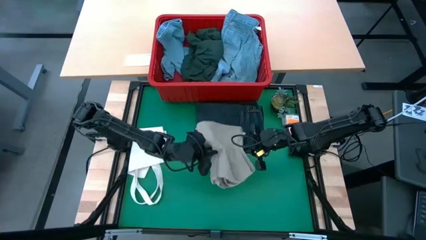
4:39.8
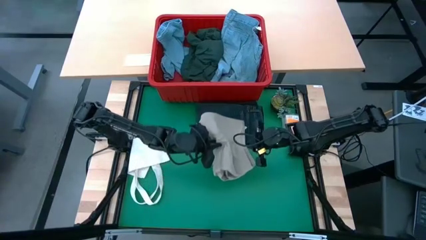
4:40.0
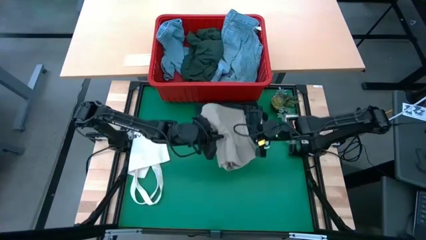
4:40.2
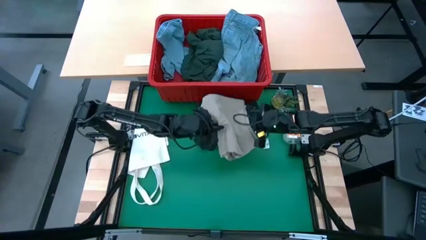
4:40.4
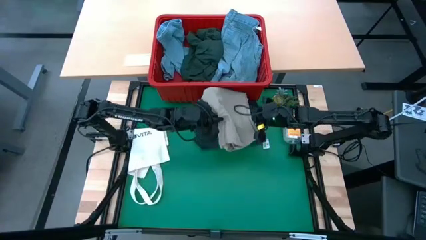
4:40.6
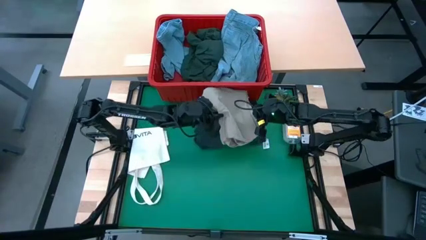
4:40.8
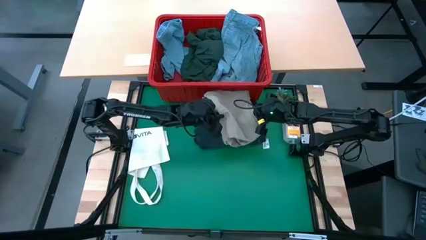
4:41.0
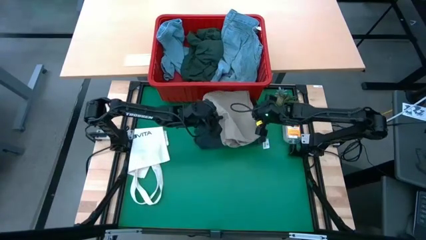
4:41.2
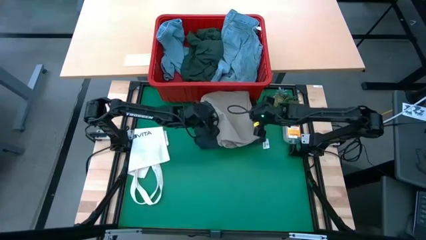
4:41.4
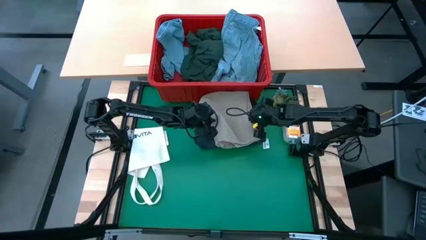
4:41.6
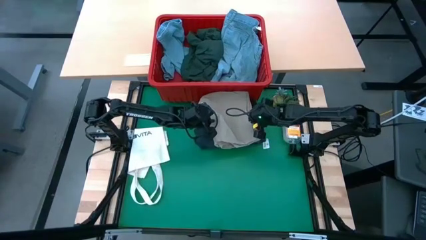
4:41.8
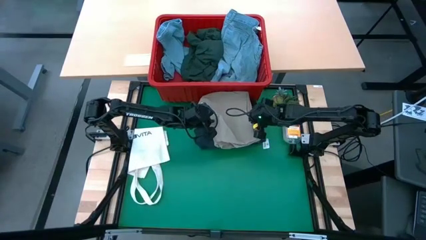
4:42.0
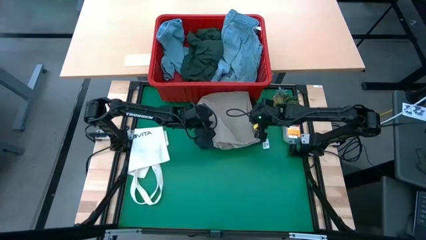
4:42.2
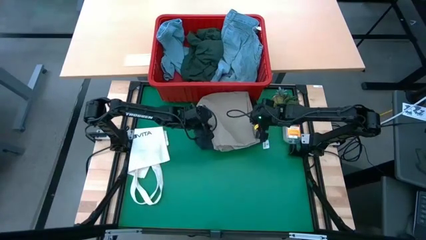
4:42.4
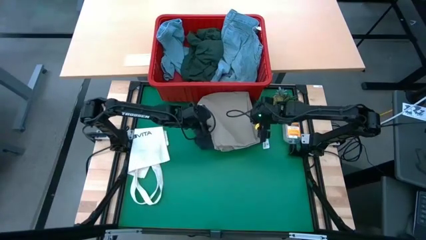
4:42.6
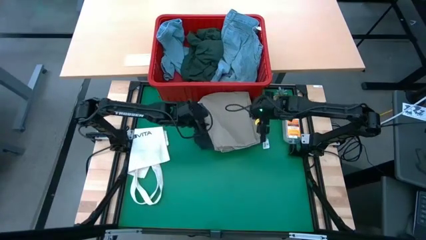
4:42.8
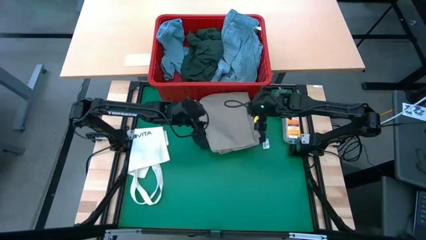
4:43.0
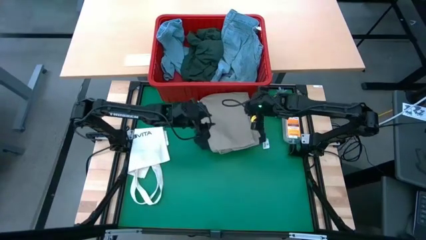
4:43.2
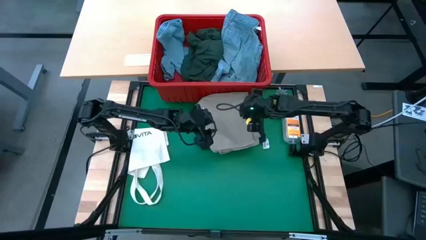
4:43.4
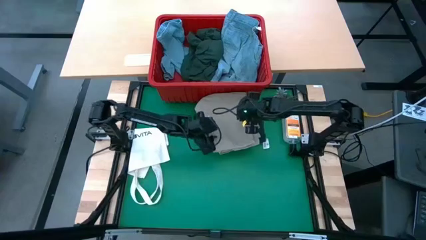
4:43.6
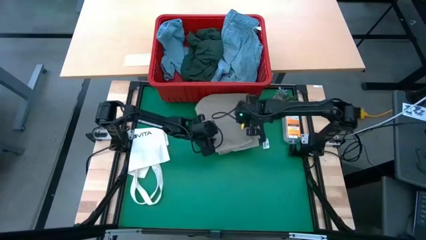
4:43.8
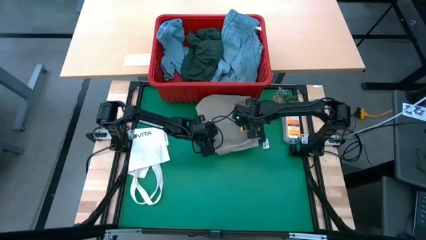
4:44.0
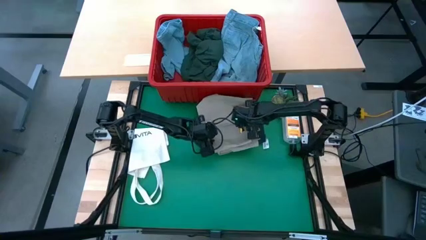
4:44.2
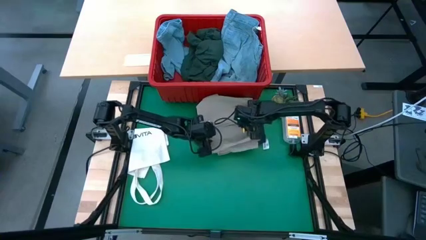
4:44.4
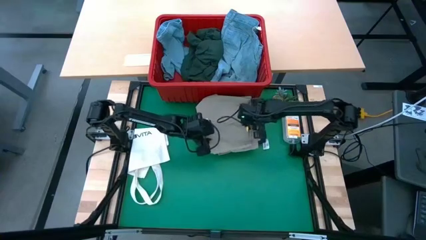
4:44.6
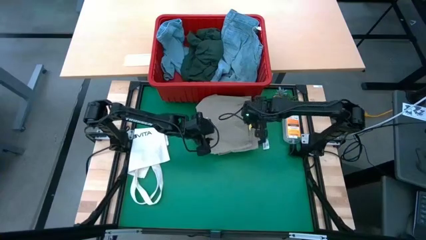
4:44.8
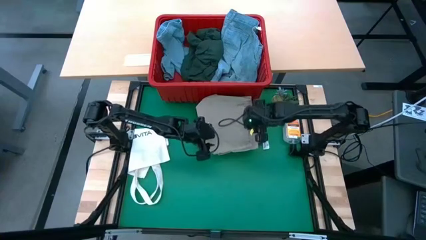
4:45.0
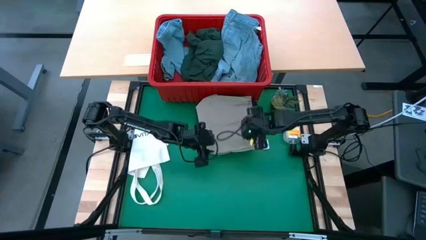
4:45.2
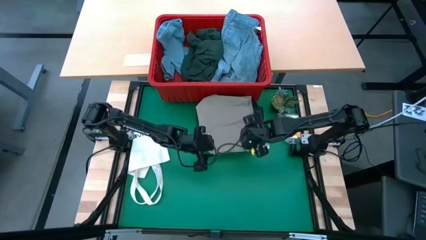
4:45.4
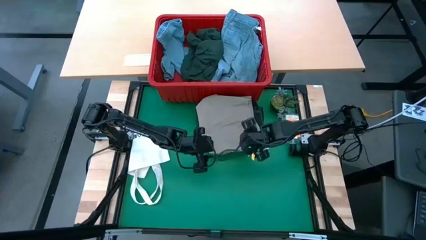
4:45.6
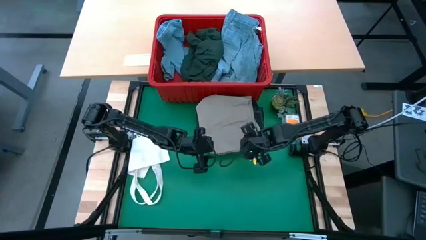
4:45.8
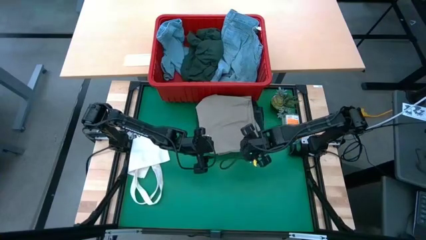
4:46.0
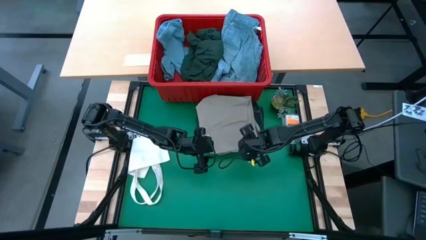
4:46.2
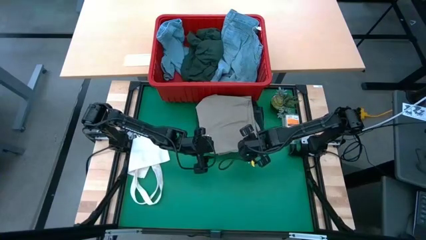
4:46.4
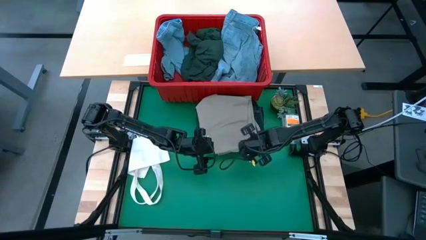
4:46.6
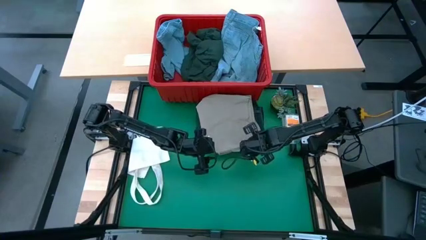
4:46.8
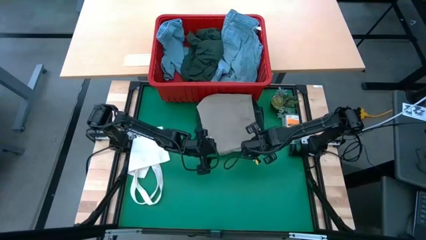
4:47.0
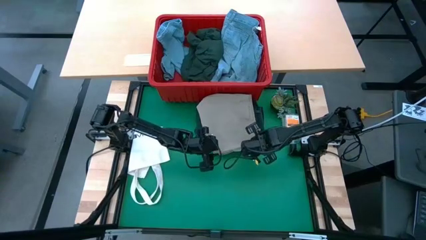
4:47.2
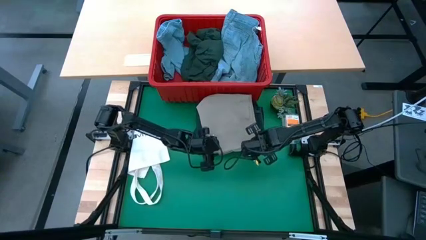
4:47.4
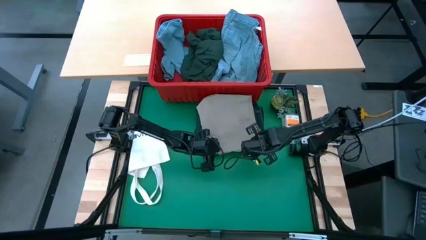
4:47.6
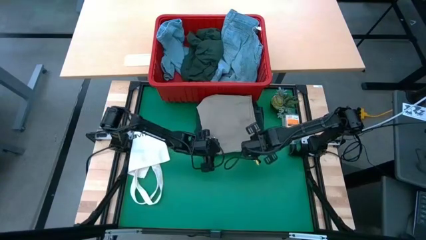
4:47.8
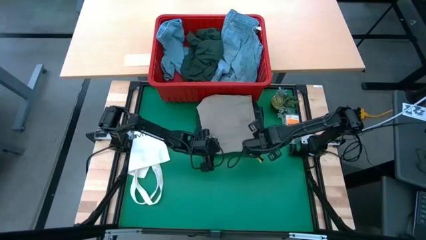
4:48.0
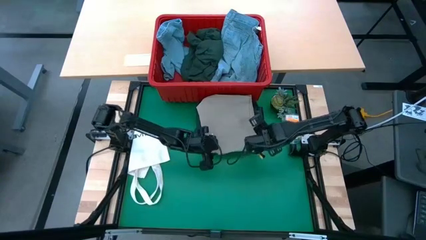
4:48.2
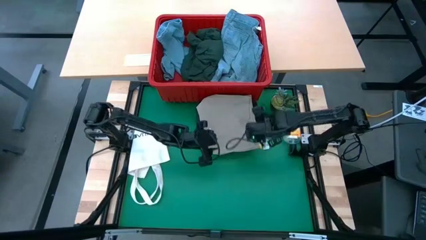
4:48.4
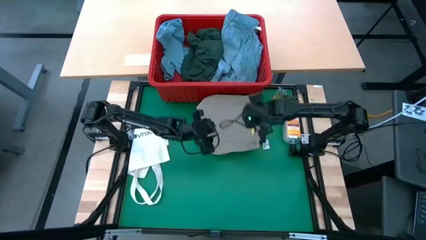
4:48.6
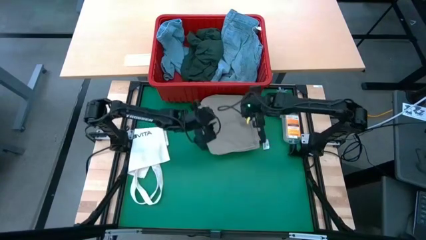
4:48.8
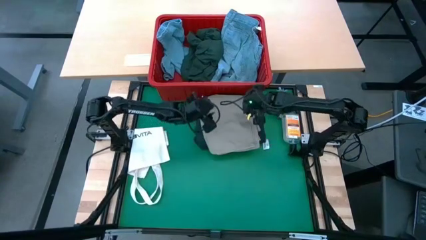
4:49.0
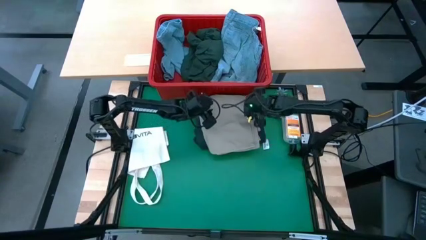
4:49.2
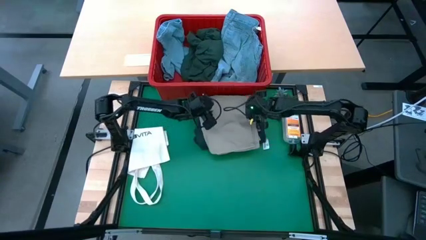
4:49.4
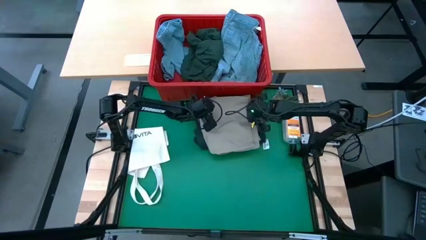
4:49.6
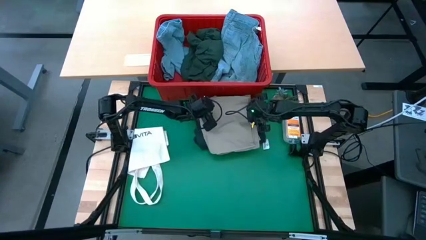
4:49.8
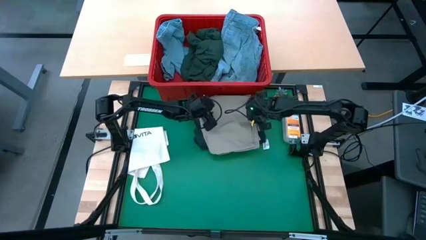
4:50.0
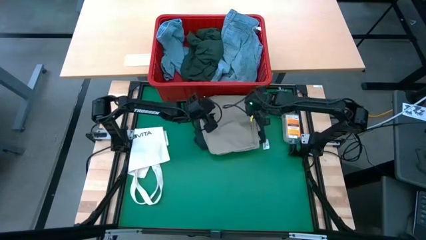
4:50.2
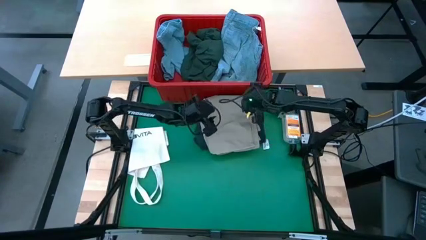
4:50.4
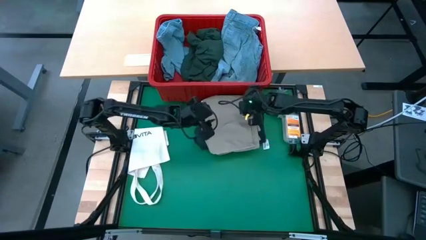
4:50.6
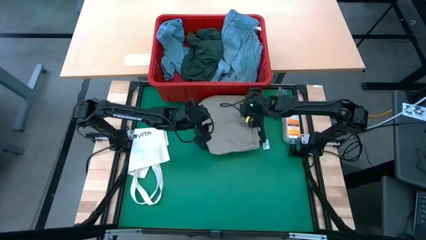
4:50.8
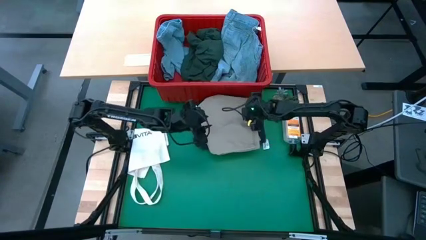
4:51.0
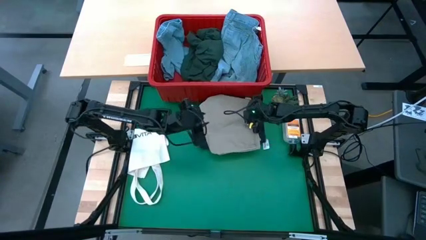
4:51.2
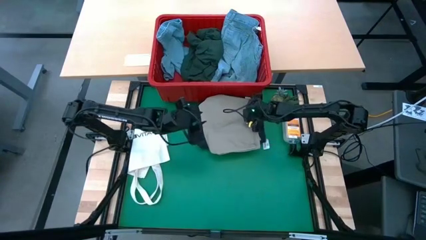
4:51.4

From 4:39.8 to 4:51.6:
Task: Fold laundry
Stack the brown shorts on the blue pants

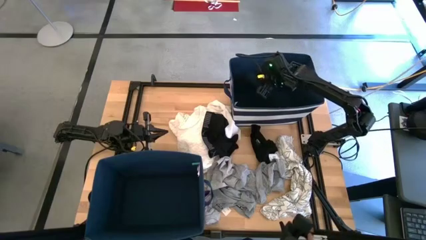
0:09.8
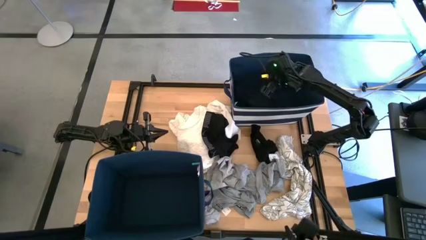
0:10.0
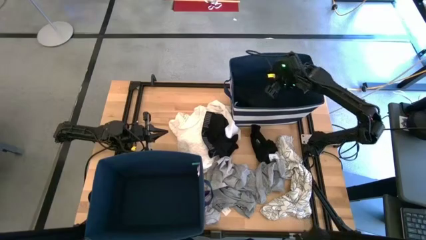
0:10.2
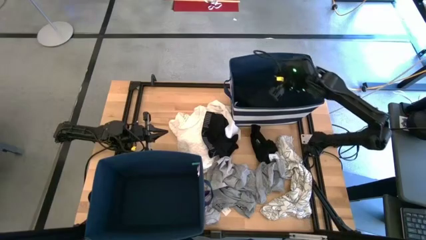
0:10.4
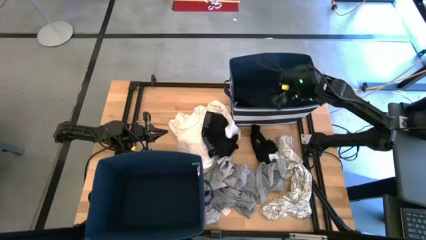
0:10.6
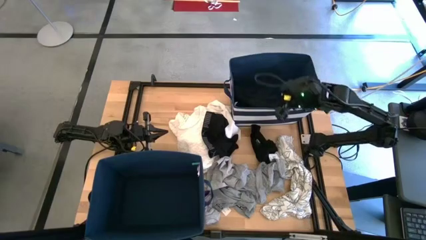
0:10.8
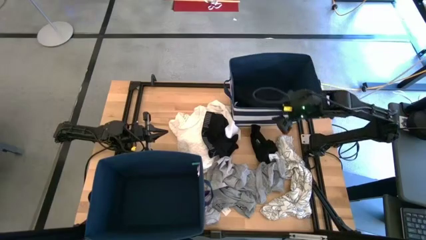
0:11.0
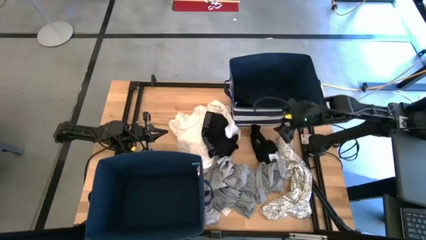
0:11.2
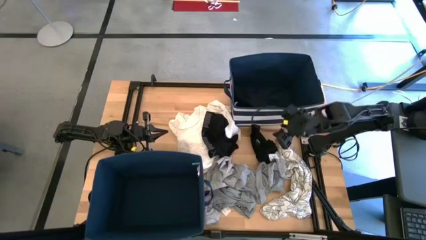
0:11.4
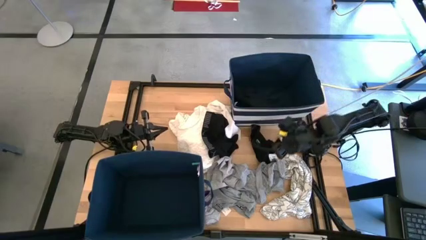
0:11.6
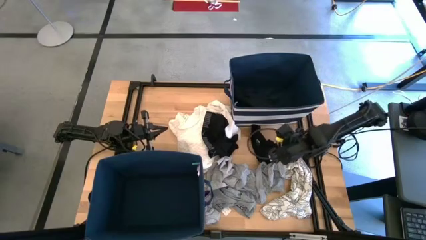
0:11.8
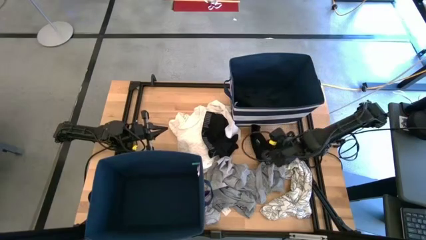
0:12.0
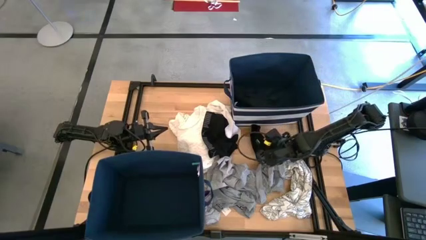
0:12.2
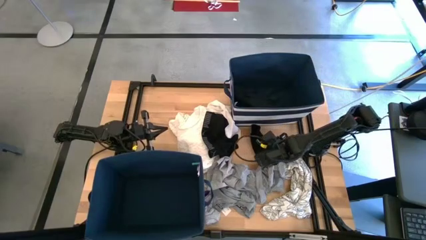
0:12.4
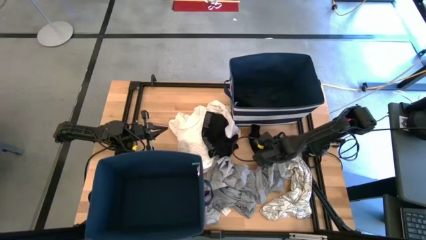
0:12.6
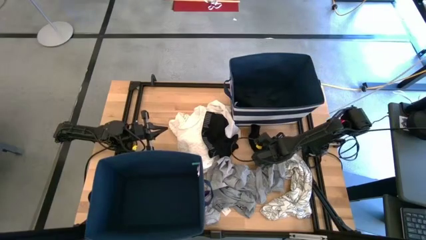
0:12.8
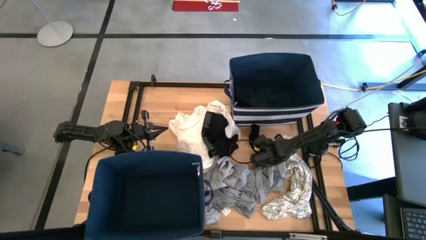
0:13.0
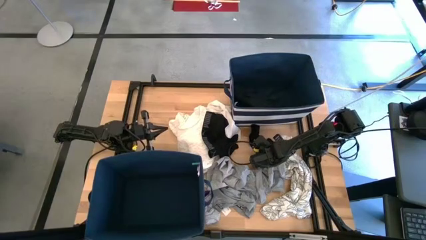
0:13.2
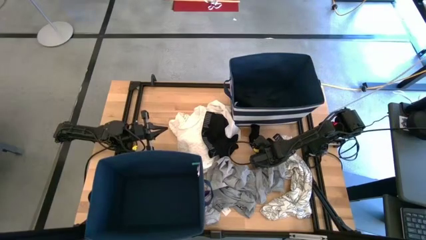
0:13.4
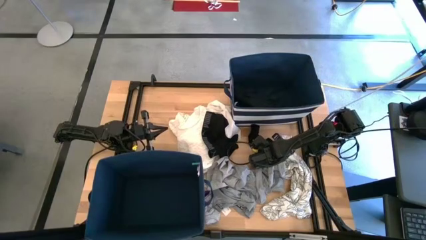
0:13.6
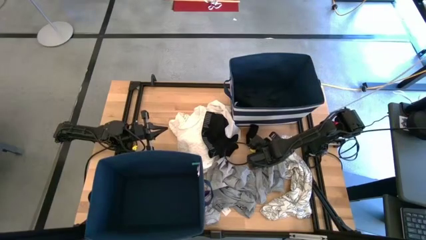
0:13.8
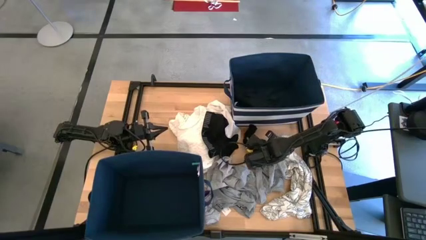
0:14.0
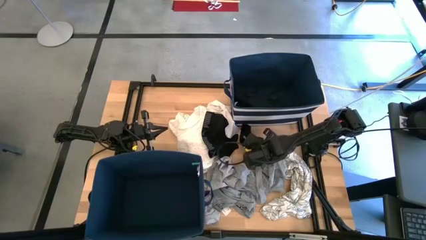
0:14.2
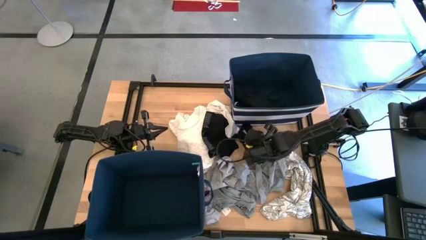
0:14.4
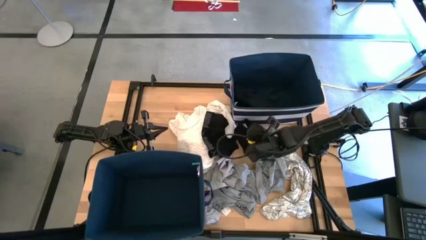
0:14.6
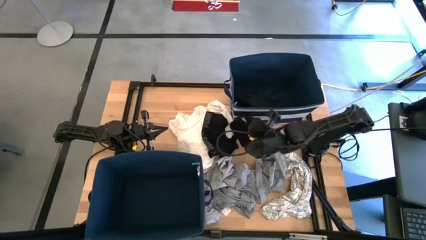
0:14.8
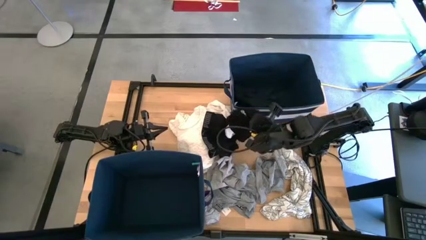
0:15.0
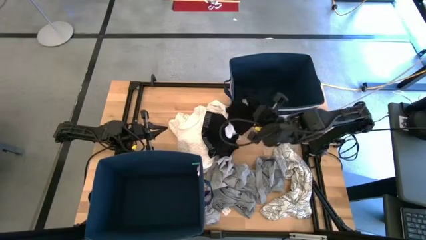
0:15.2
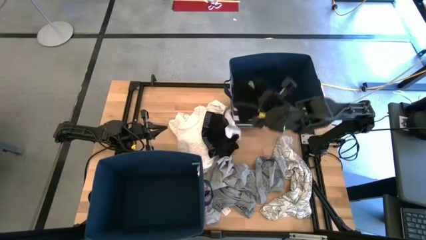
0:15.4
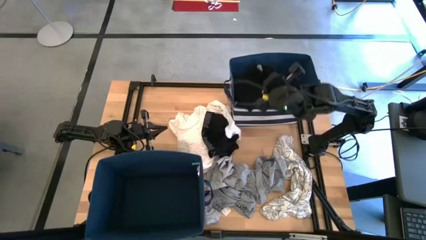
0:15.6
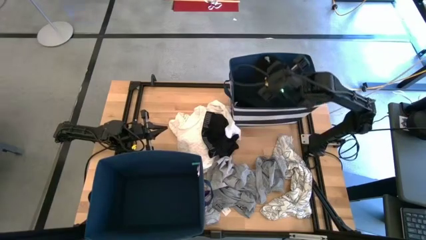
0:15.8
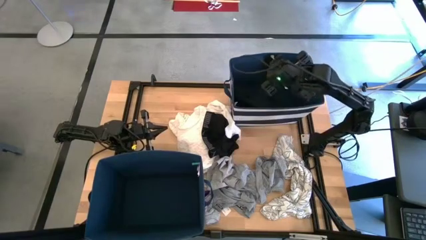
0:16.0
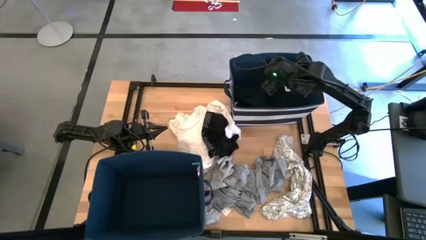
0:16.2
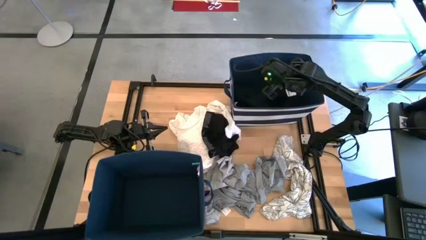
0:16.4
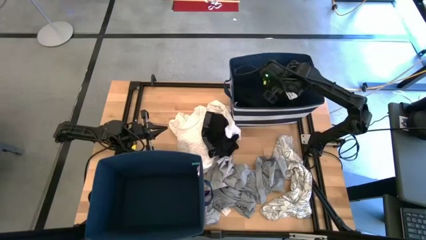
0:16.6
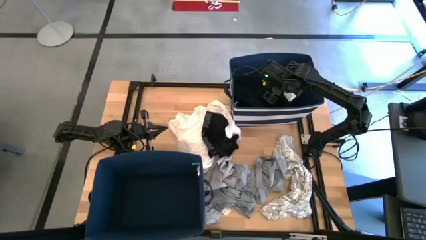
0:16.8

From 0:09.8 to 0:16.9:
Task: Sort clothes
Put the black underwear into the top right laundry bin
